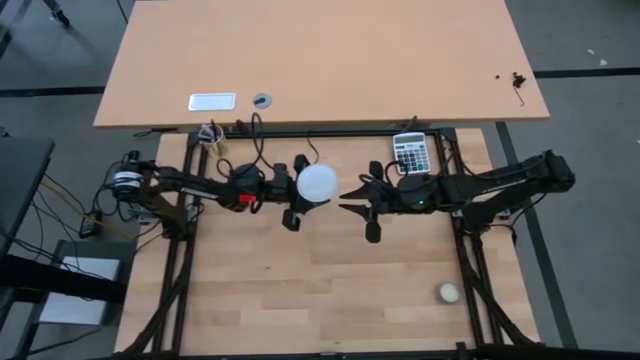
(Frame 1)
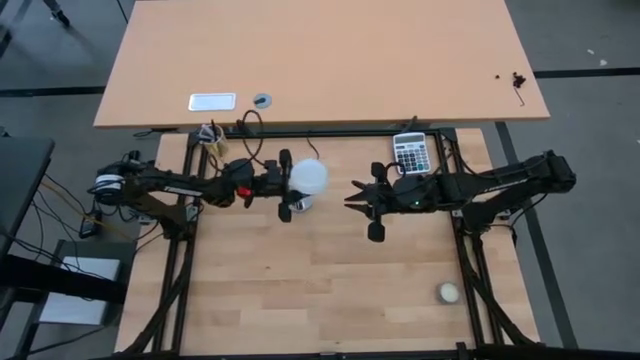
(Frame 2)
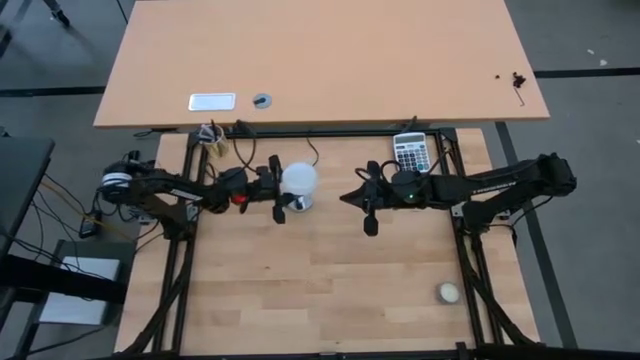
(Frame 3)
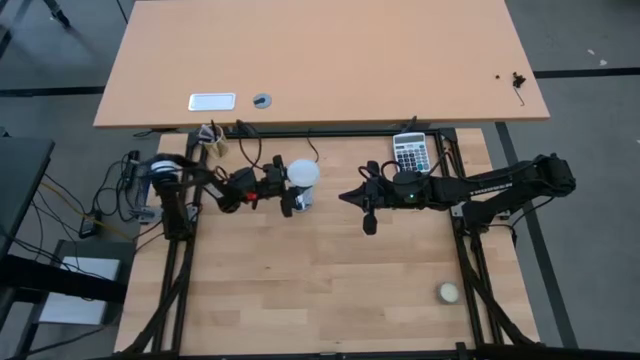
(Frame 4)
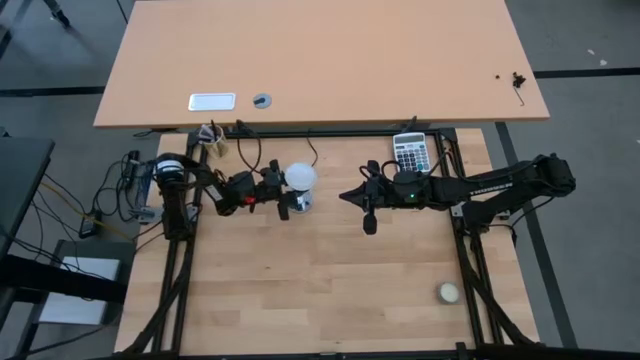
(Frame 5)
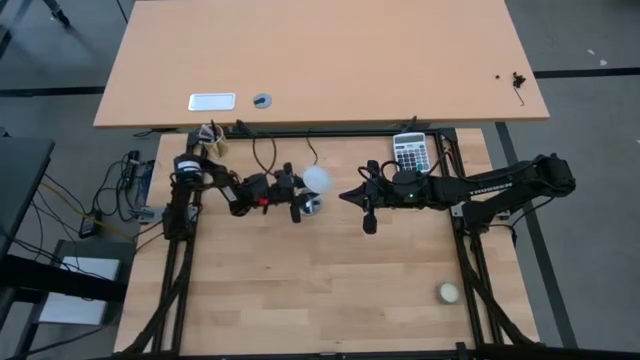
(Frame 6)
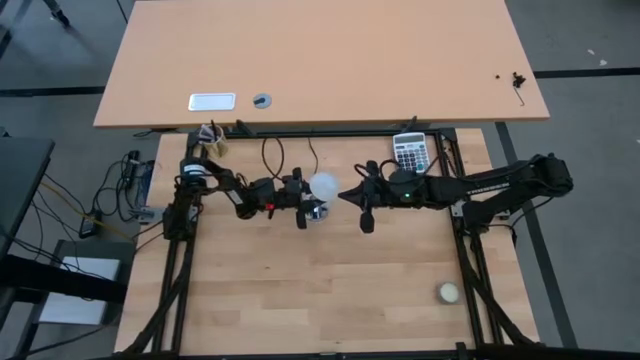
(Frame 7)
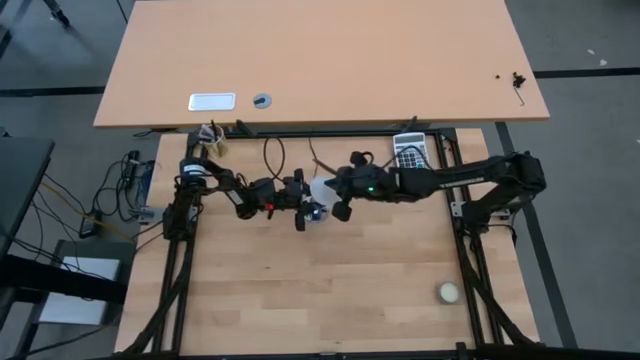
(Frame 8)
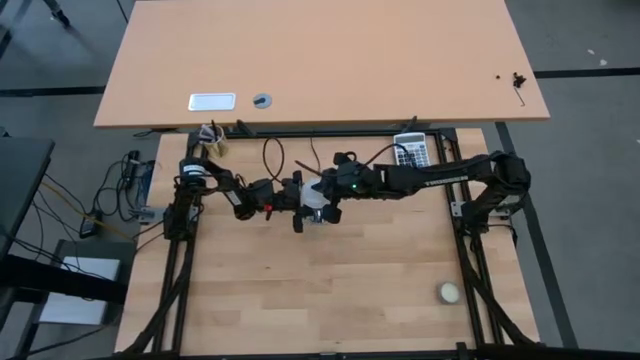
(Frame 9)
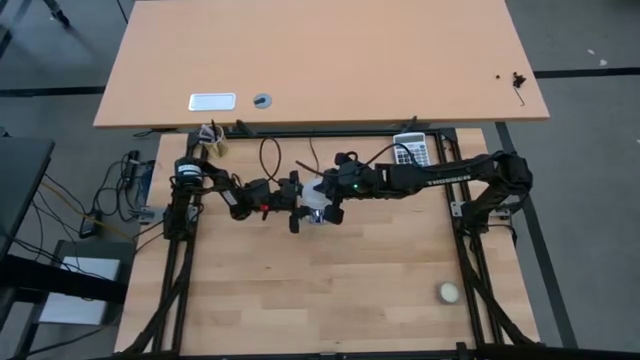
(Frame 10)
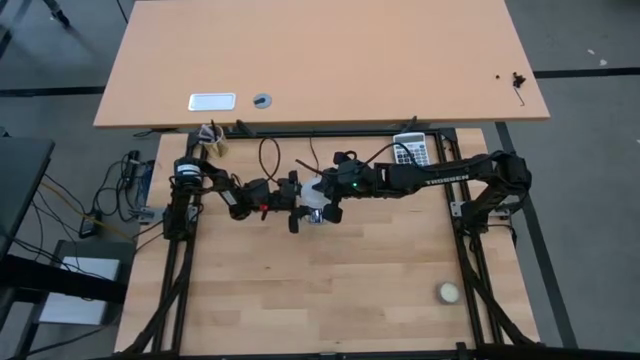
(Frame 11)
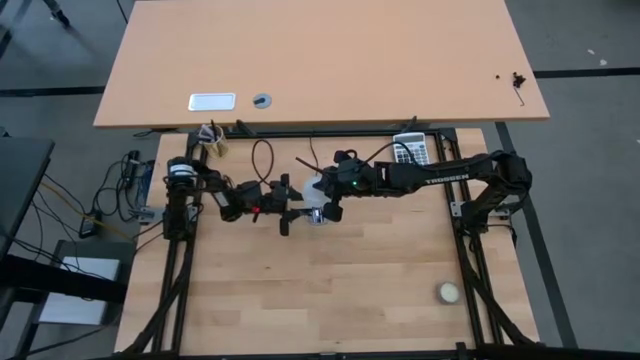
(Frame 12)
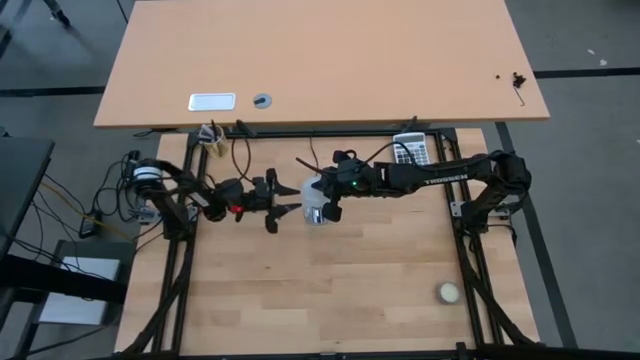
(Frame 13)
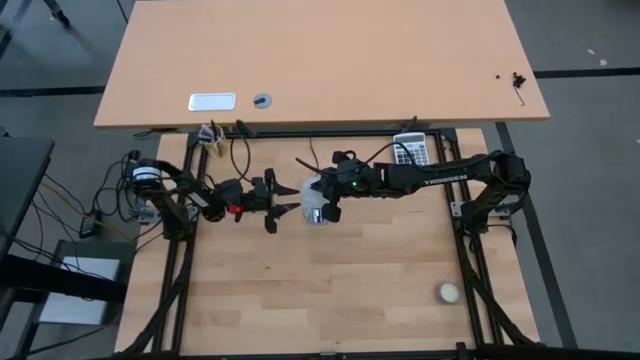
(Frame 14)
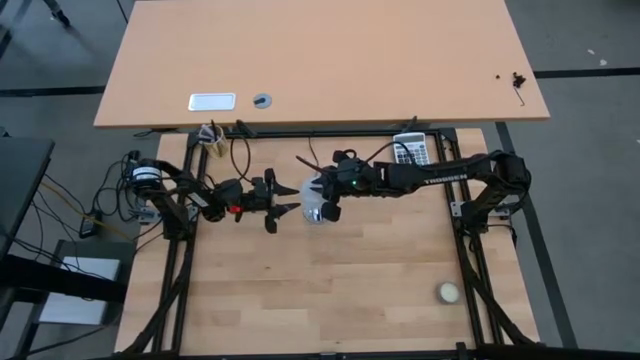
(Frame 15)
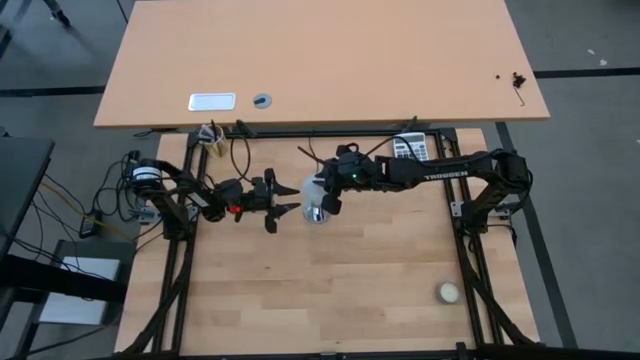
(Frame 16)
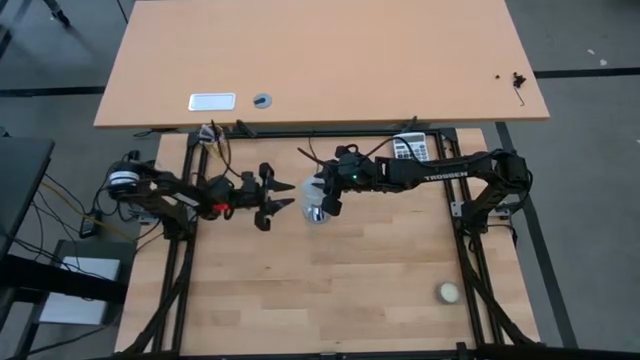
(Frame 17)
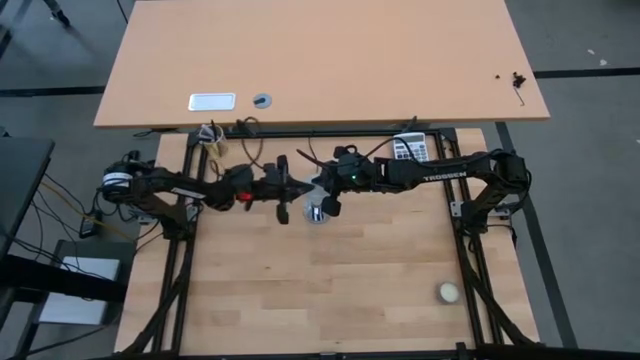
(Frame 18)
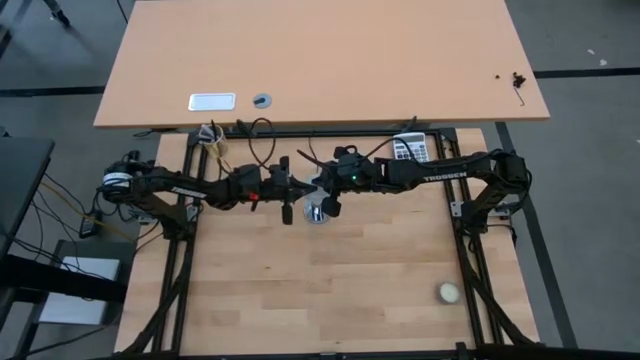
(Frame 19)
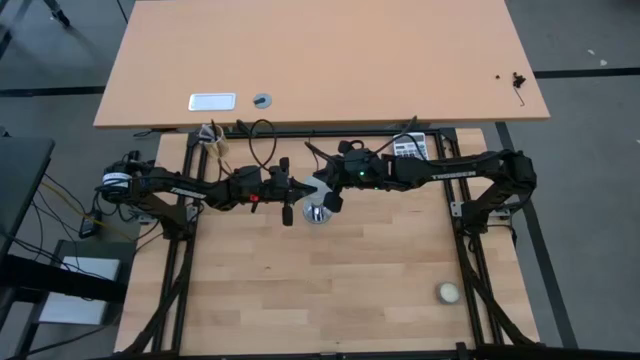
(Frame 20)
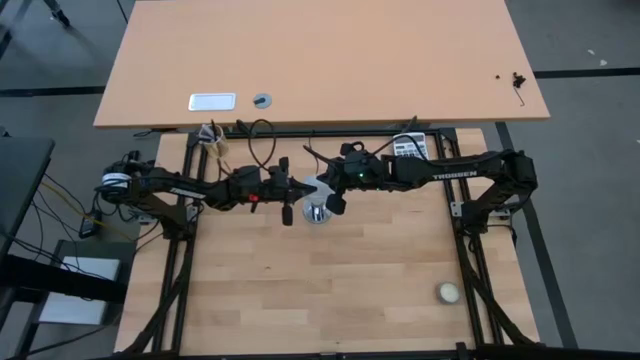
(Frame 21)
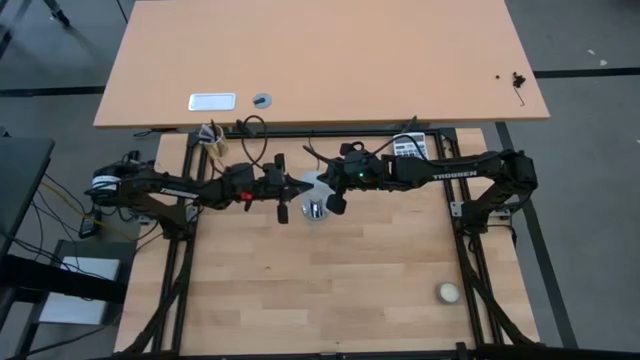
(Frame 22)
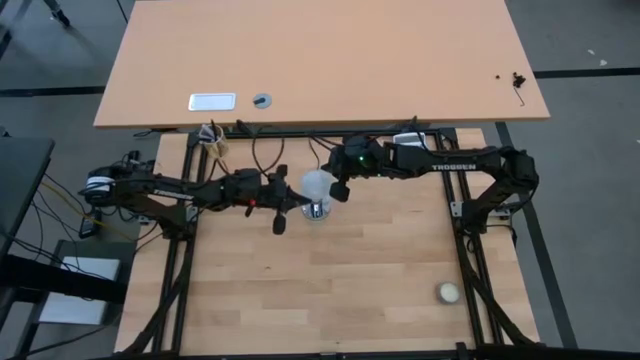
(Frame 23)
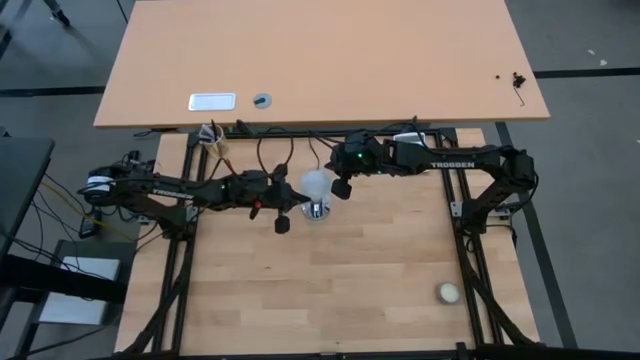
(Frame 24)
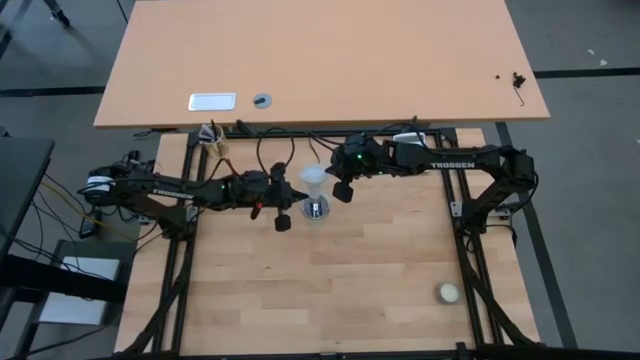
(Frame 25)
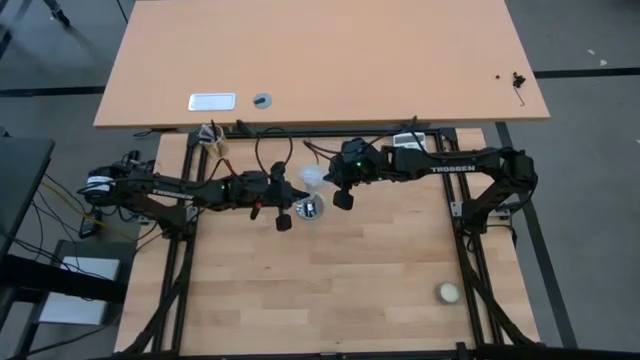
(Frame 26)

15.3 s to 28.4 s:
Task: Screw lightbulb
Insert the white lightbulb into the silver lamp

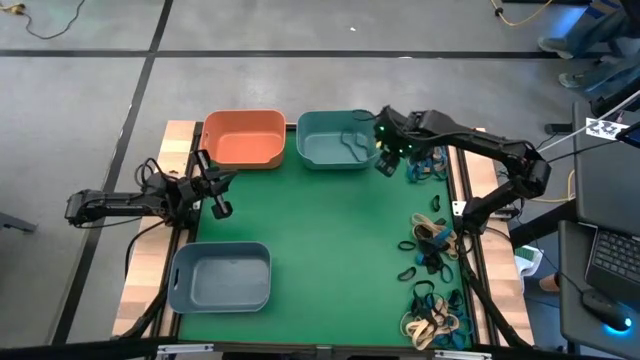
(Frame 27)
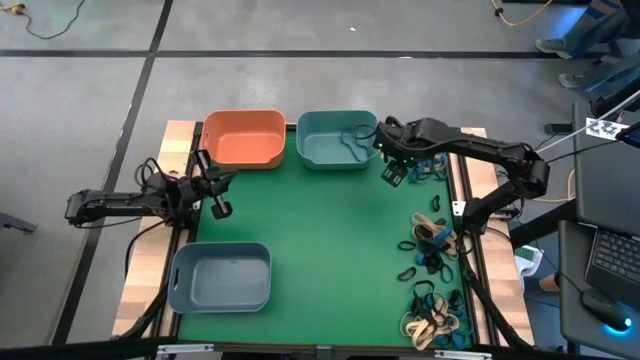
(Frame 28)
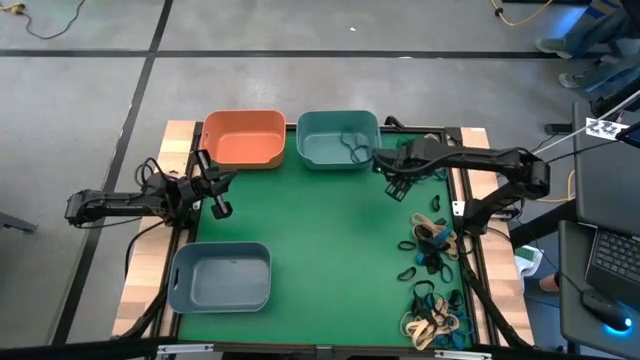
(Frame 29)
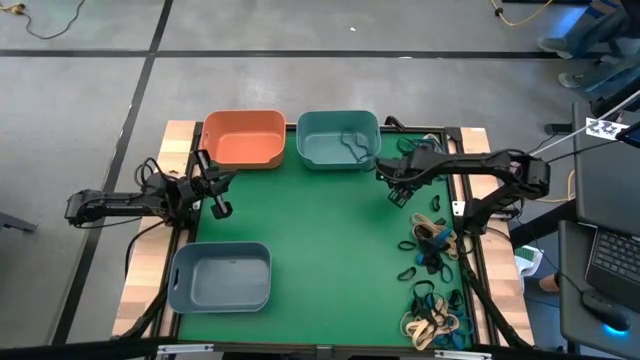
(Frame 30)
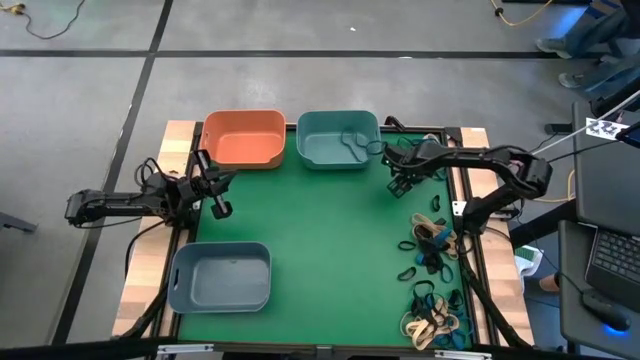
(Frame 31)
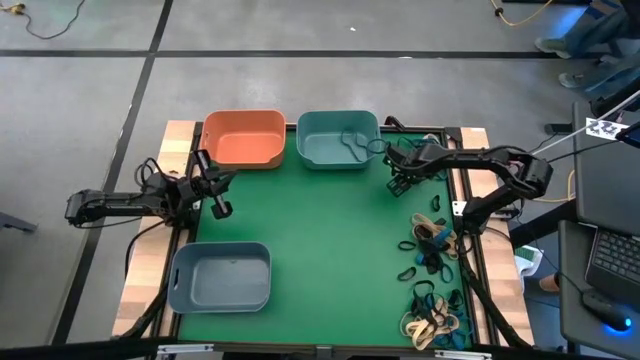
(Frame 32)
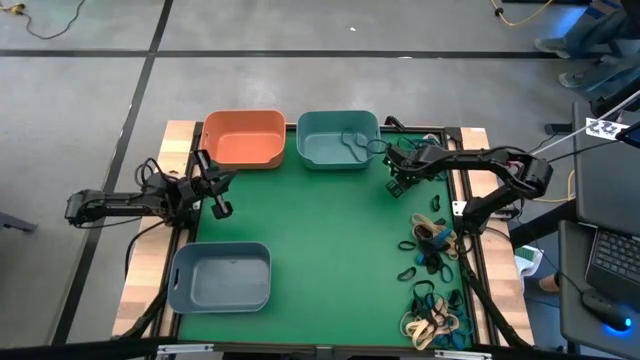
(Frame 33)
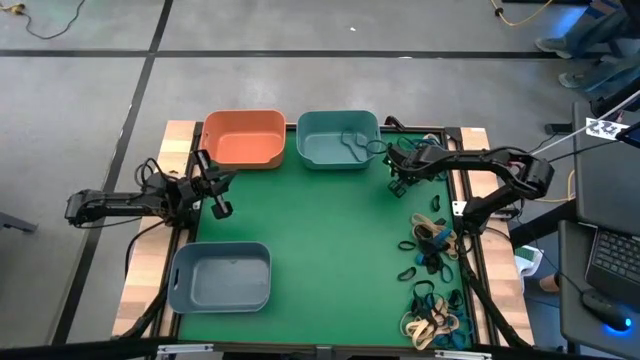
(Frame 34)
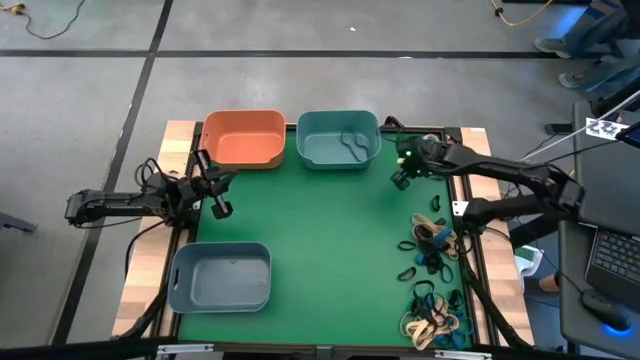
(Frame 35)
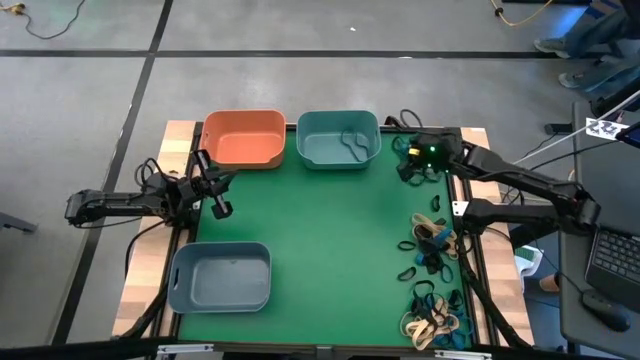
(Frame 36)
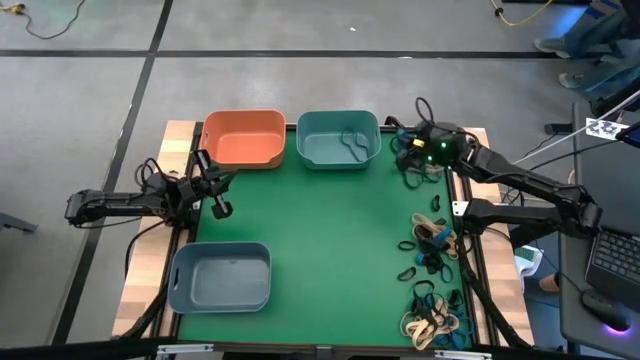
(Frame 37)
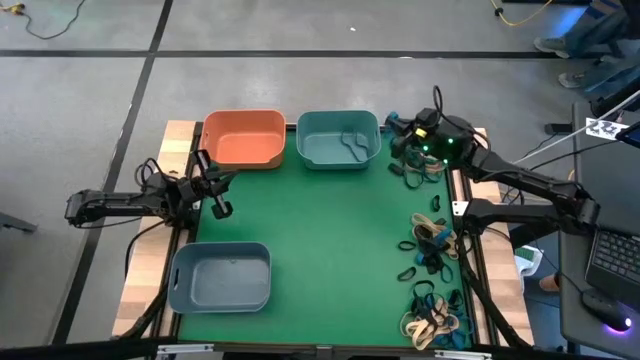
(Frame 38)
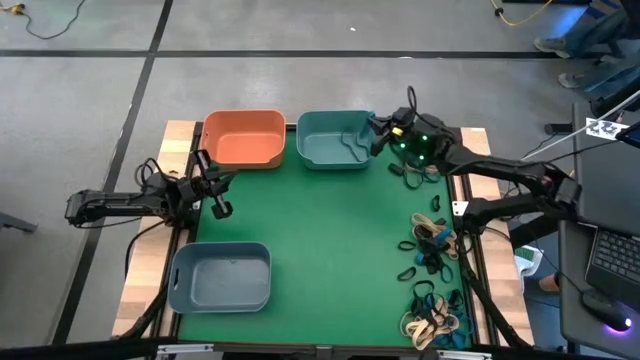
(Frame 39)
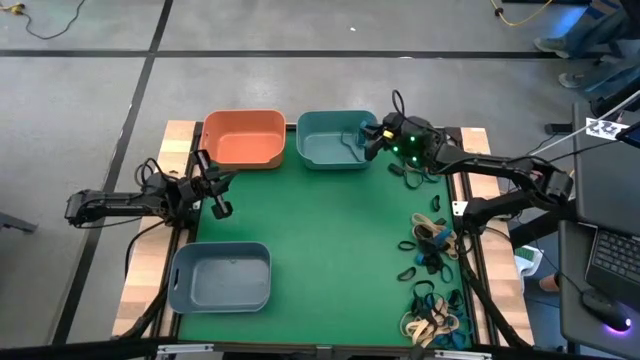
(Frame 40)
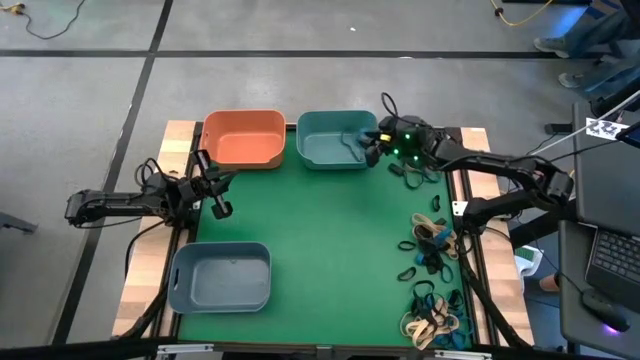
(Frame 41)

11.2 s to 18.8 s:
Task: Sort rubber bands into baskets
Put the blue rubber band into the green bin
